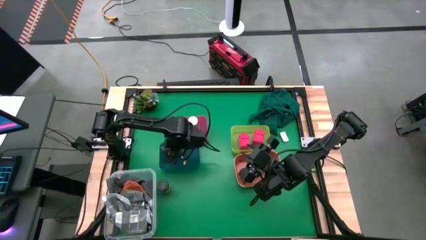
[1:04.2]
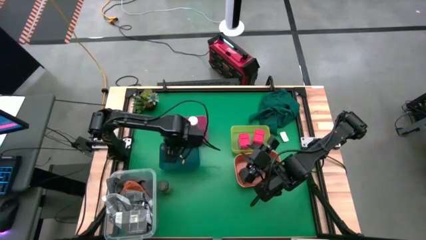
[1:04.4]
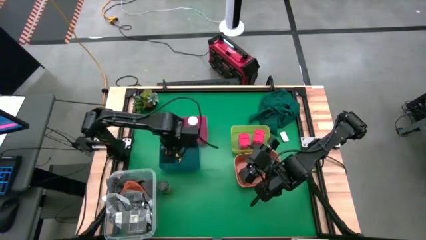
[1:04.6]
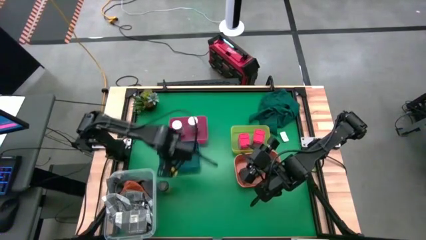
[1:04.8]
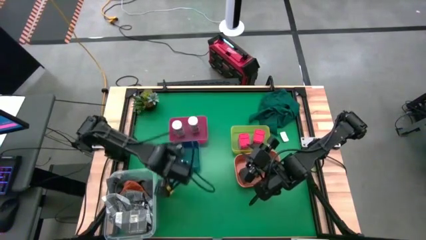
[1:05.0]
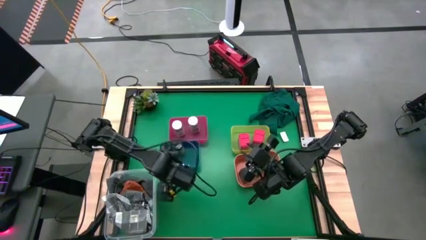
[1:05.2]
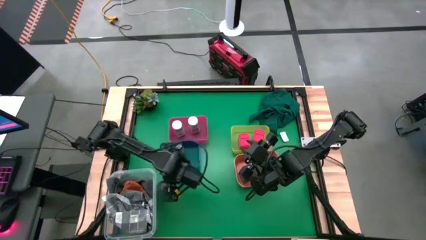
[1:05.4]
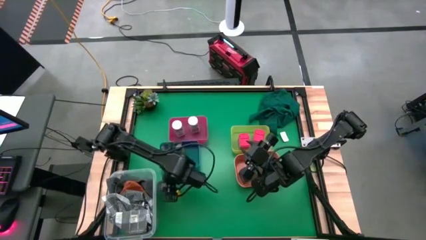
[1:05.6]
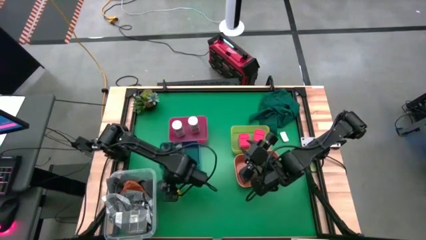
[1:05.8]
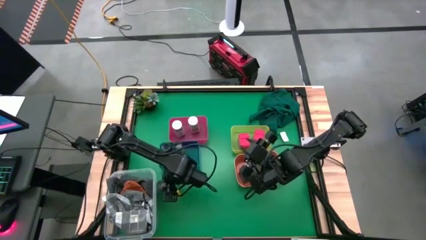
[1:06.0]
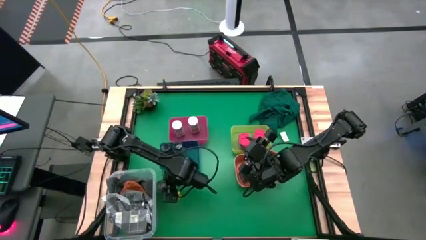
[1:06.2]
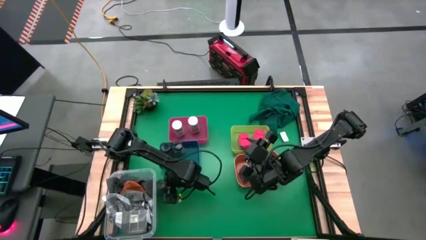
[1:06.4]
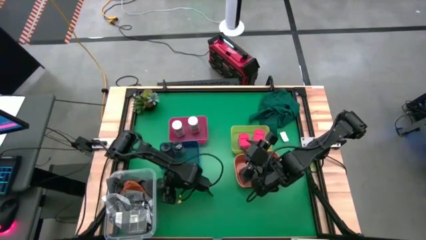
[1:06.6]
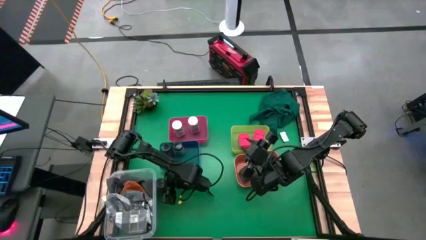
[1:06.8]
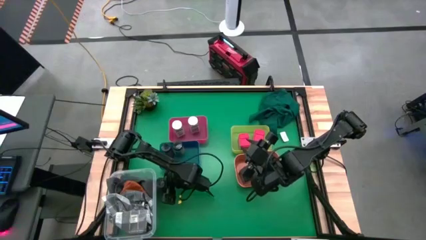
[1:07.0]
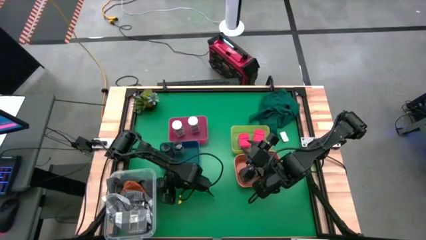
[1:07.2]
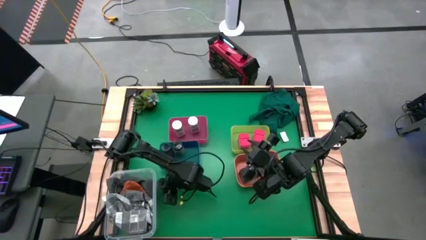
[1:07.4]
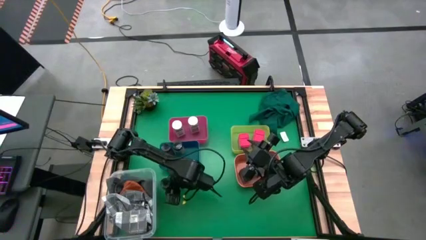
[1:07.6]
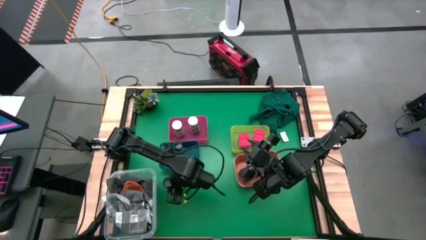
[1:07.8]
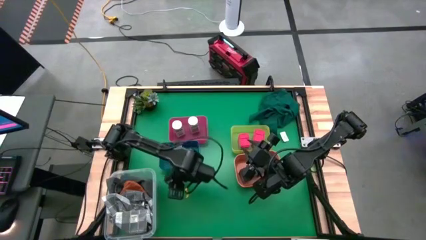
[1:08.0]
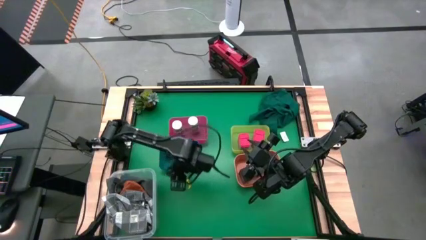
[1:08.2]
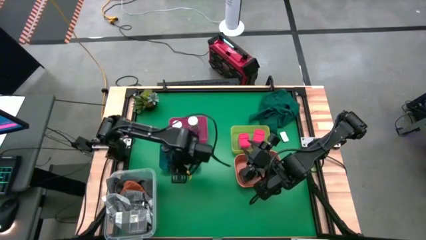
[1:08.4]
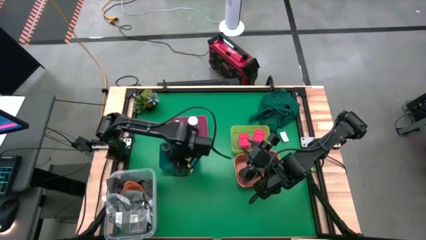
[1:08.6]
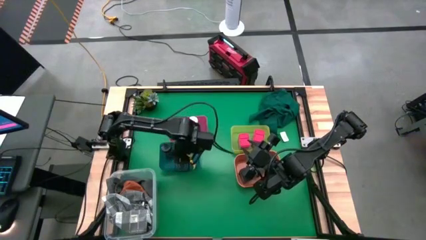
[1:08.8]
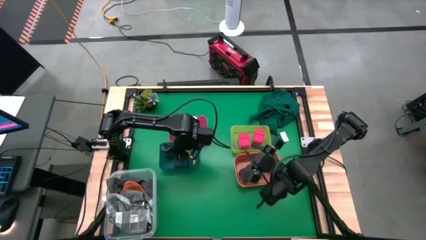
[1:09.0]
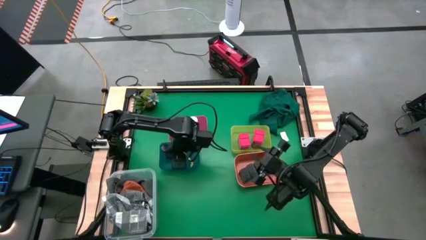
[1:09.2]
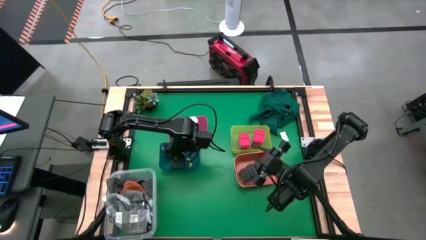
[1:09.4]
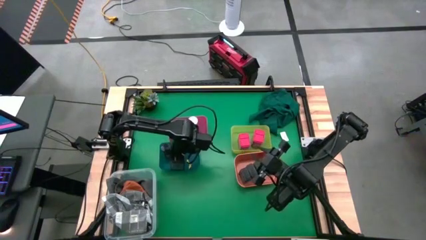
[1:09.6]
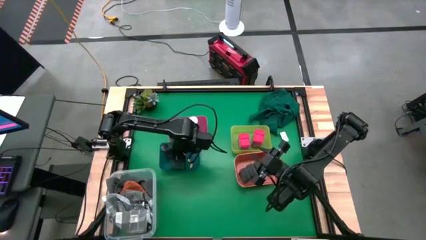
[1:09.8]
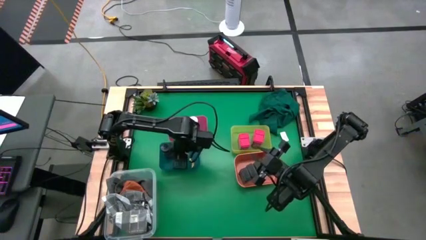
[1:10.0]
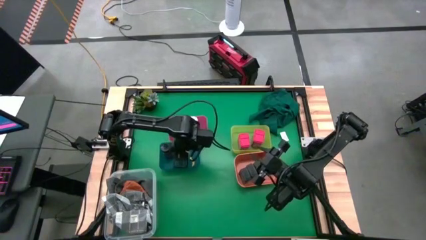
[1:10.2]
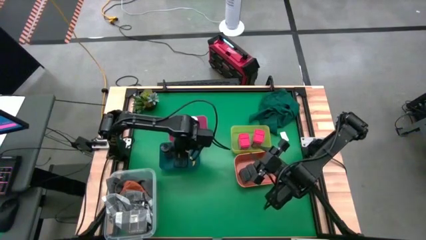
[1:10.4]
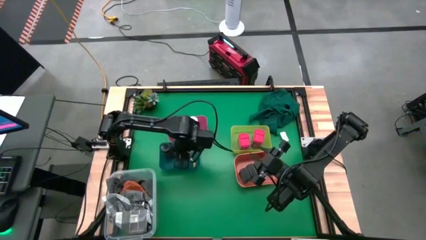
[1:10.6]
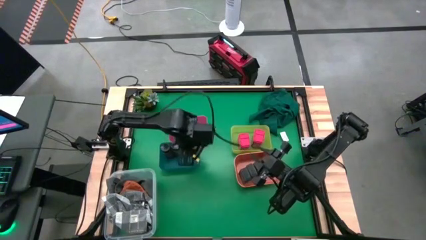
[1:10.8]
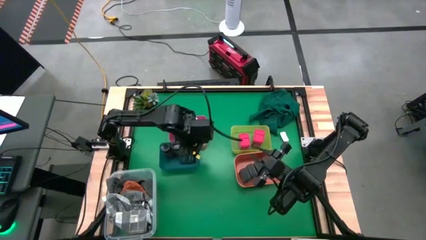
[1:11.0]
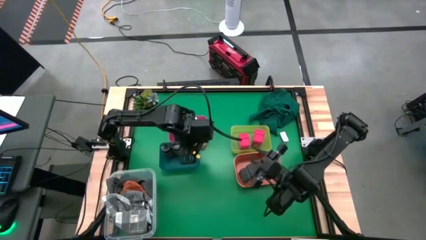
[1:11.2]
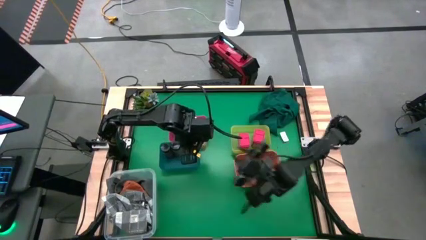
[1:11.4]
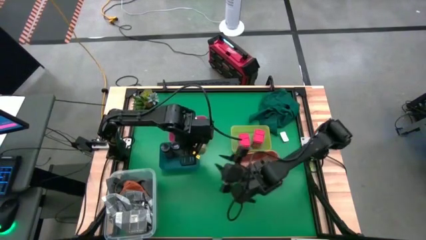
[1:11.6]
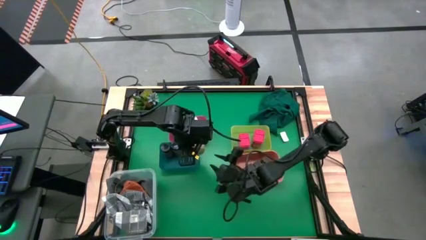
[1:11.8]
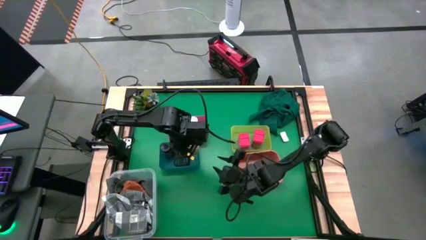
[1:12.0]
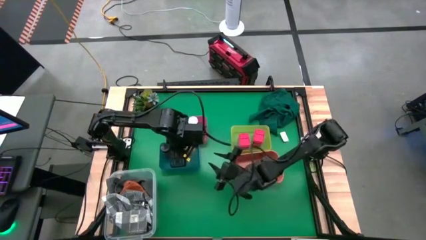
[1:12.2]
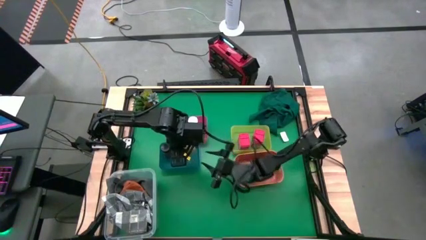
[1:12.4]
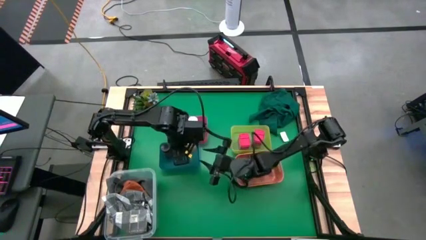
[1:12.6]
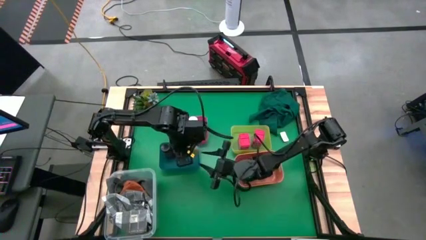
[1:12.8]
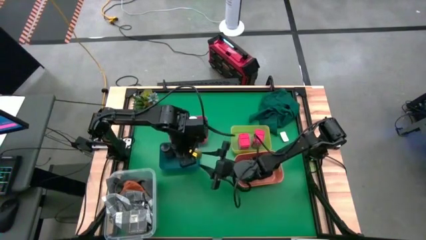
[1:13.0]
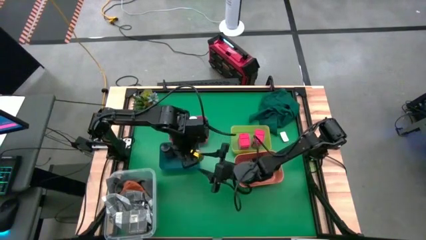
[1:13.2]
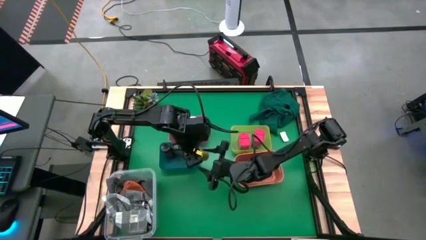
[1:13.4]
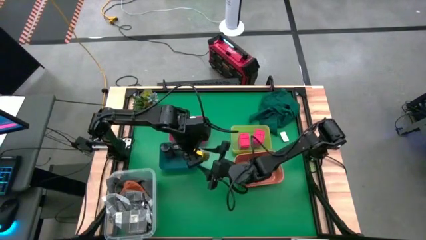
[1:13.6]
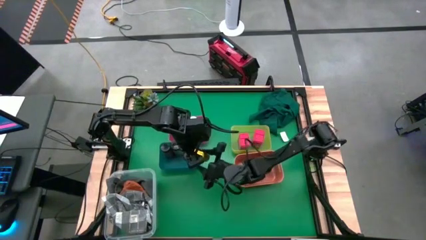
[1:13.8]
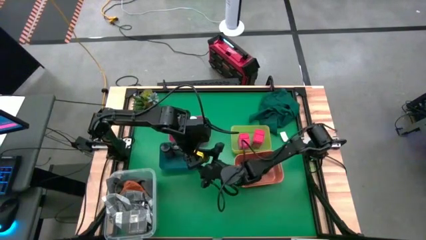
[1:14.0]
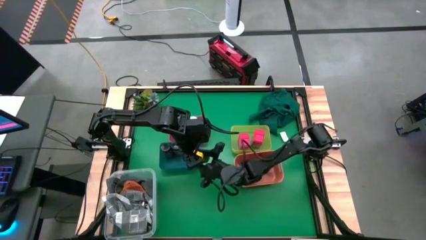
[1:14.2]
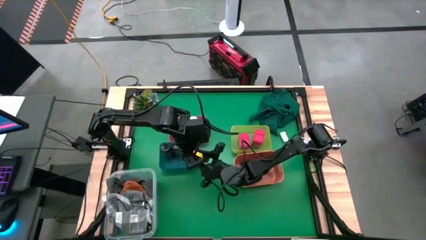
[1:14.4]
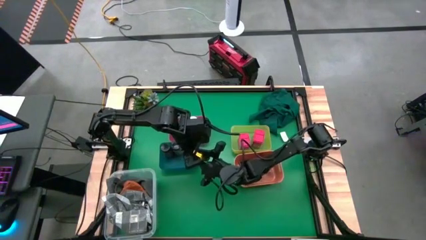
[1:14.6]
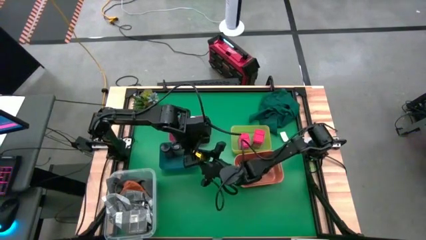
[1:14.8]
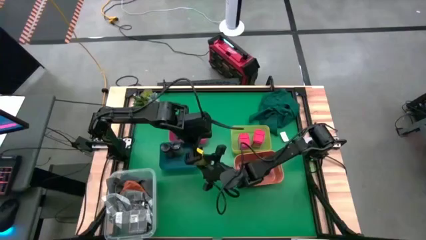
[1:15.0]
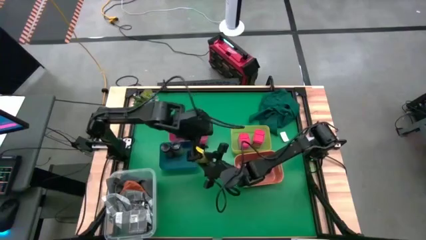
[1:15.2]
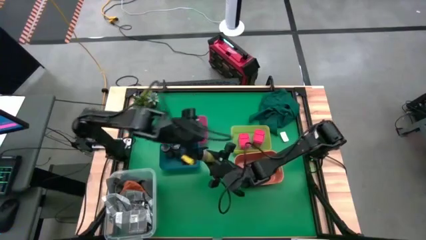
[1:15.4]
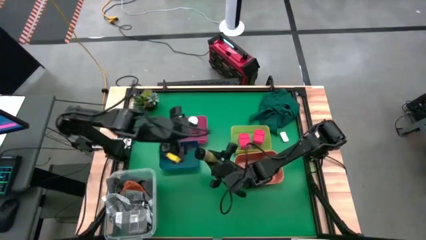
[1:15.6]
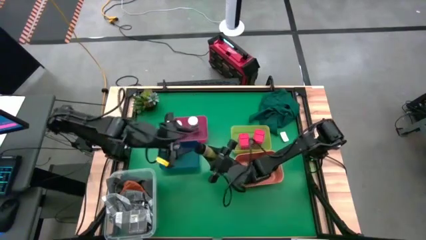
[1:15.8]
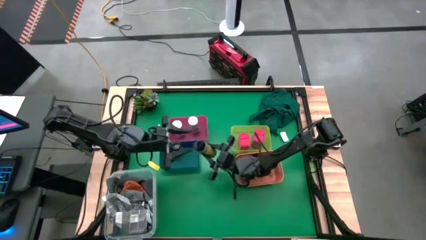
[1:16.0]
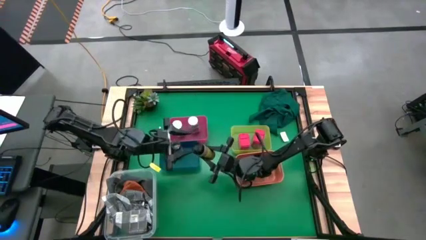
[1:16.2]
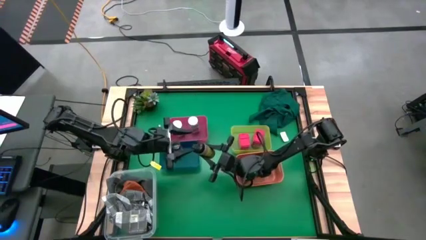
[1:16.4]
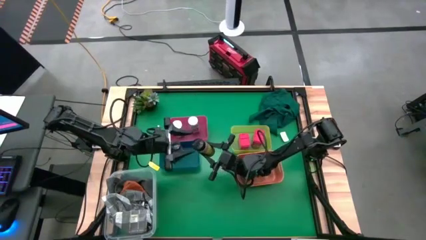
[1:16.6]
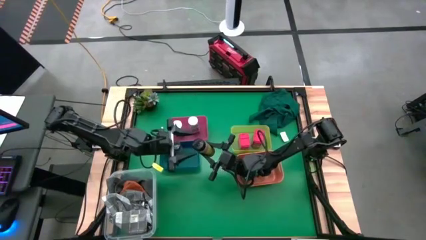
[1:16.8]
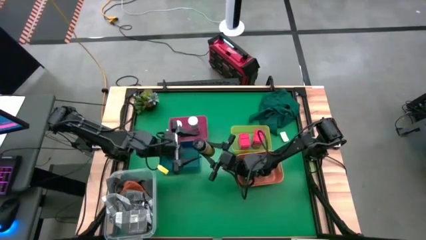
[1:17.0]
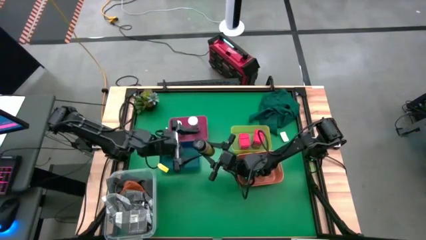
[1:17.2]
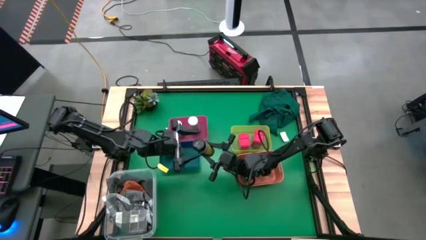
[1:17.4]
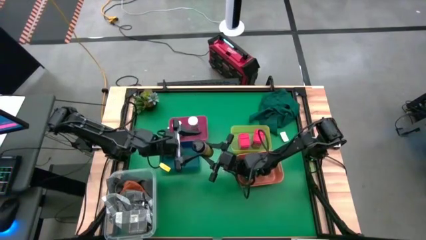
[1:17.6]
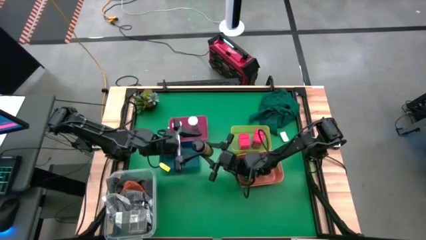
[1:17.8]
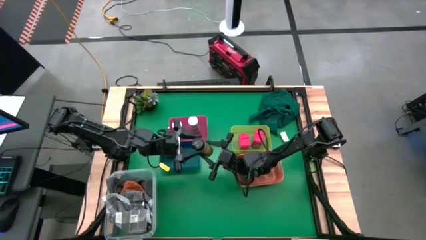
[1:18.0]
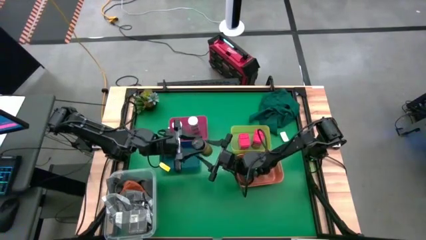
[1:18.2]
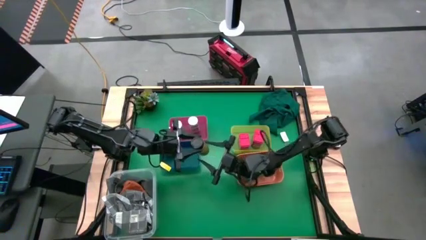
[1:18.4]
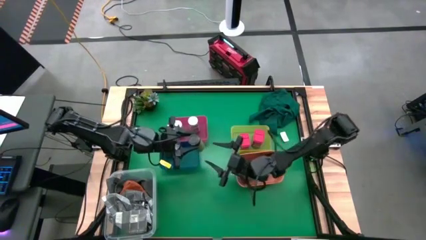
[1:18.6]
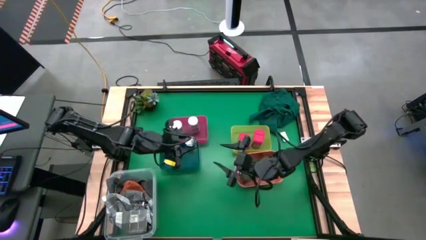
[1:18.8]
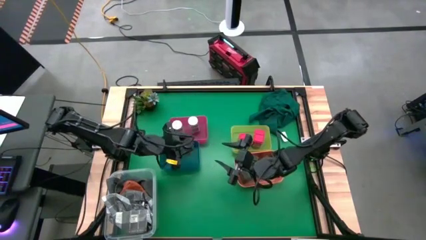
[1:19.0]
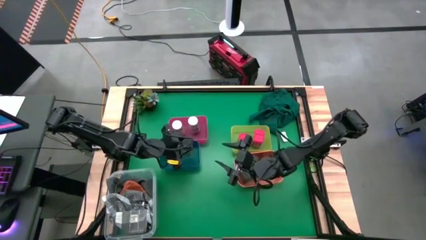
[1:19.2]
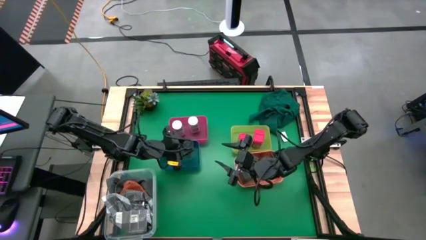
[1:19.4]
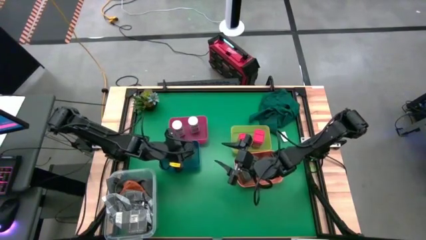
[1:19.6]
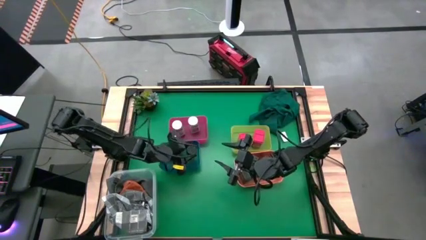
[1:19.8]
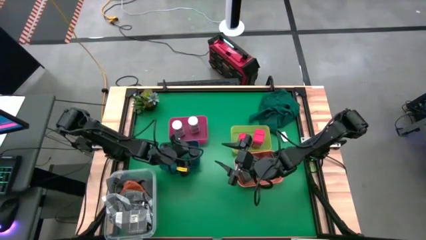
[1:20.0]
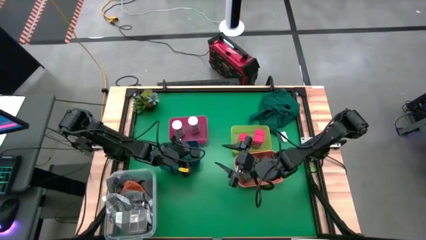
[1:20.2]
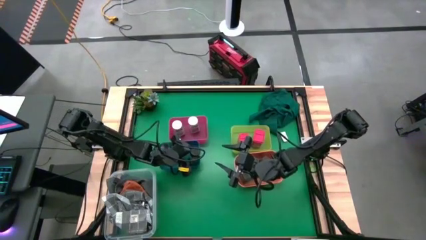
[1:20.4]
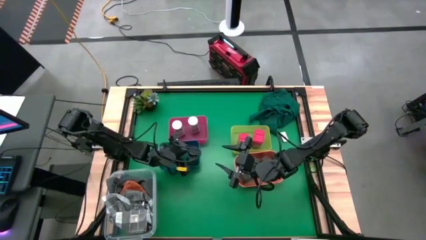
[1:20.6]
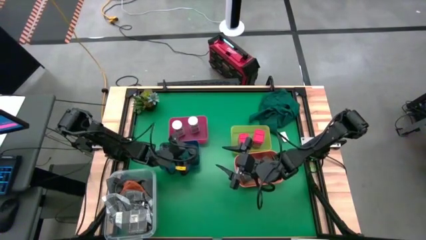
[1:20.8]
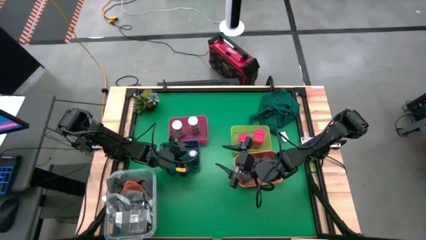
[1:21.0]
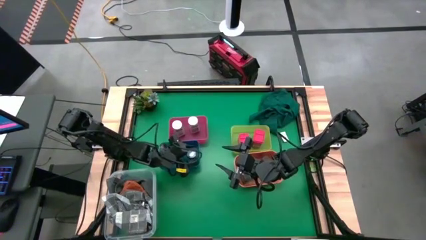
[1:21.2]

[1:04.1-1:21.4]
Task: Sort spices by type
Put the black seasoning bottle into the blue bin
